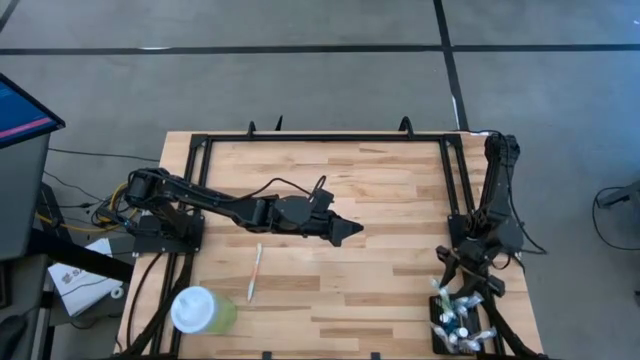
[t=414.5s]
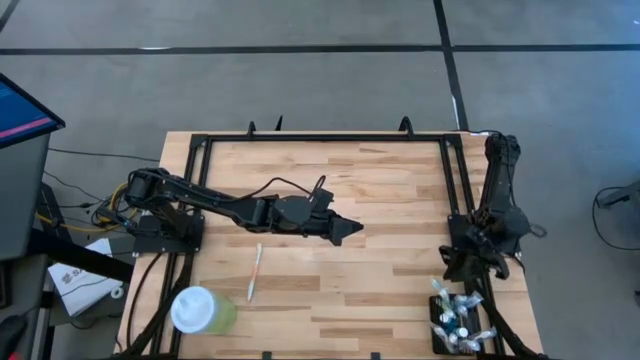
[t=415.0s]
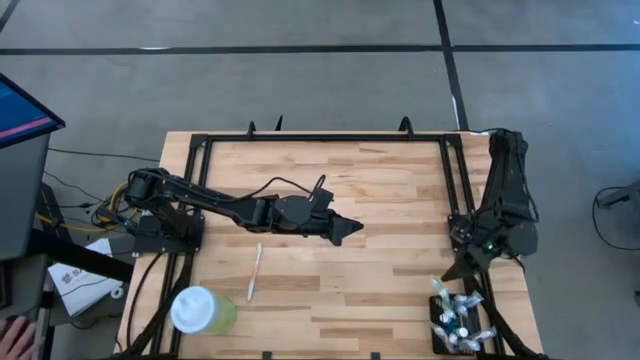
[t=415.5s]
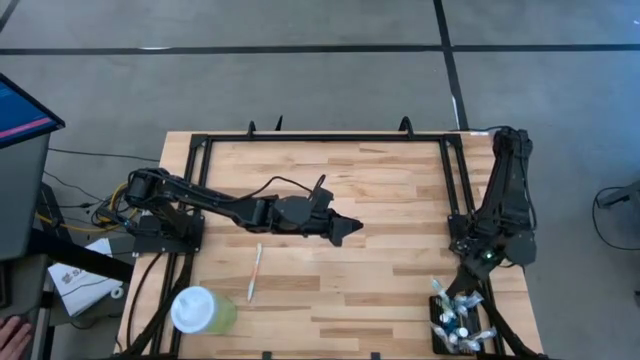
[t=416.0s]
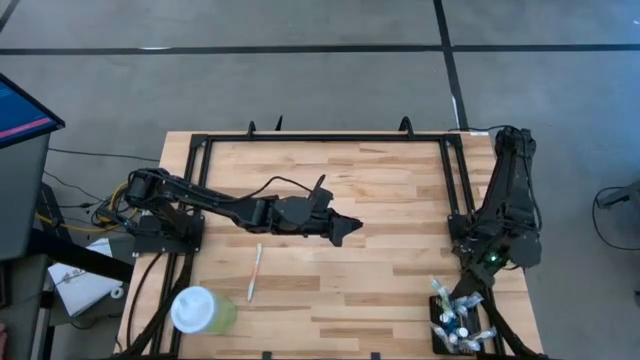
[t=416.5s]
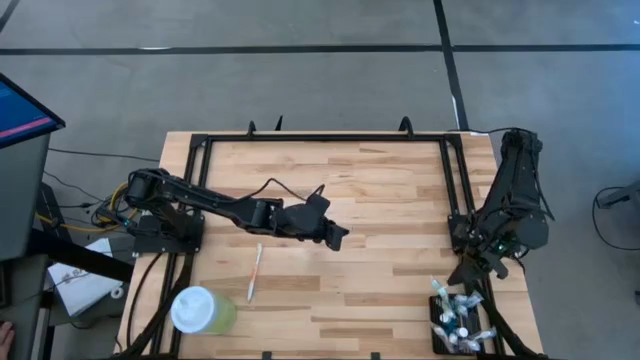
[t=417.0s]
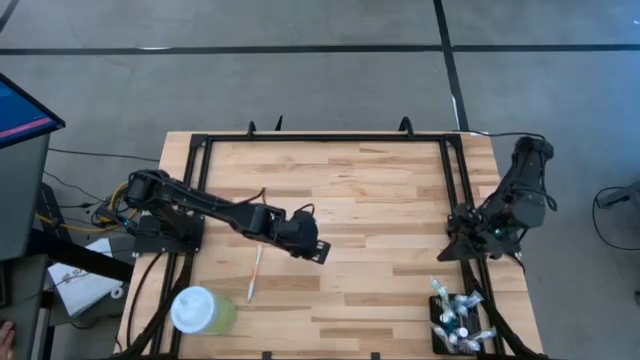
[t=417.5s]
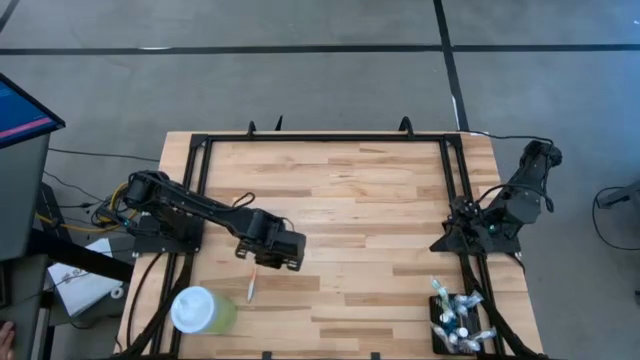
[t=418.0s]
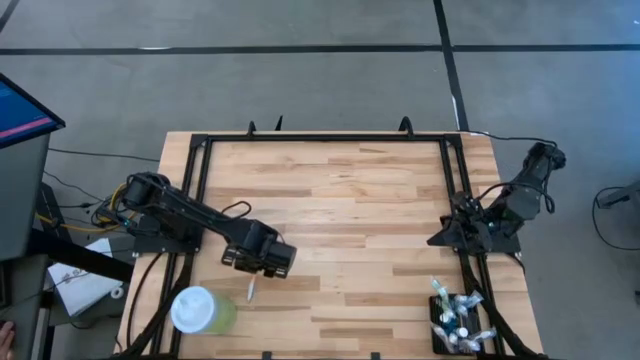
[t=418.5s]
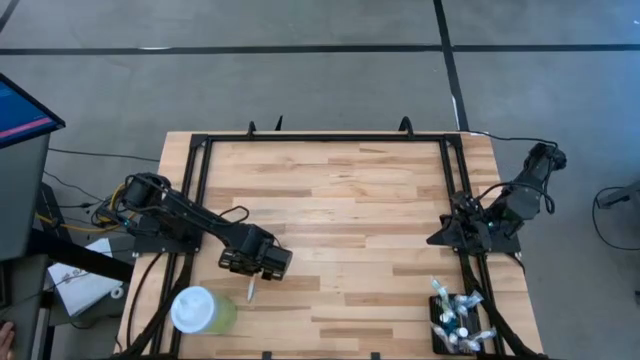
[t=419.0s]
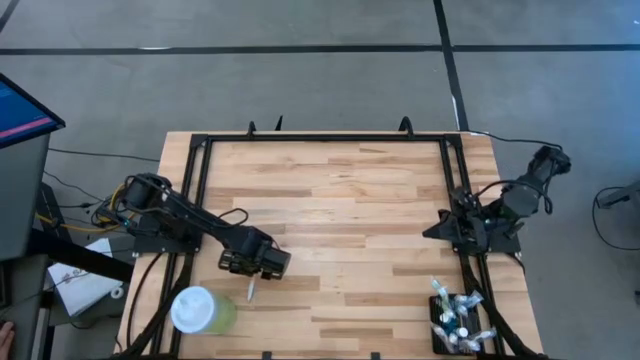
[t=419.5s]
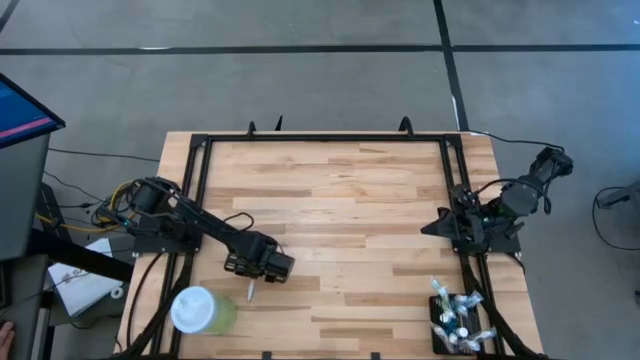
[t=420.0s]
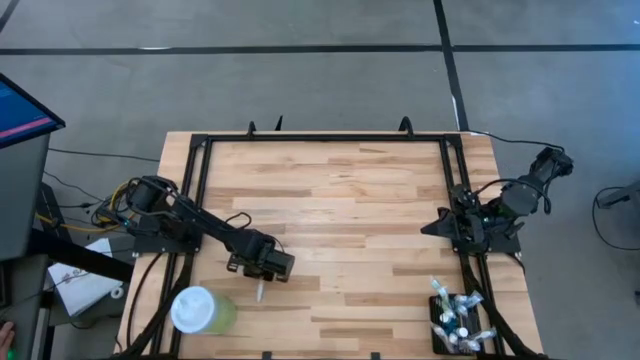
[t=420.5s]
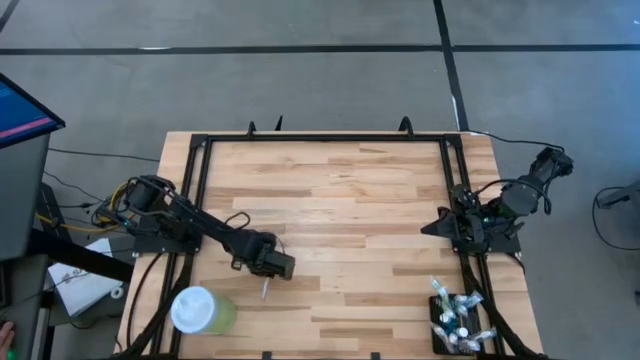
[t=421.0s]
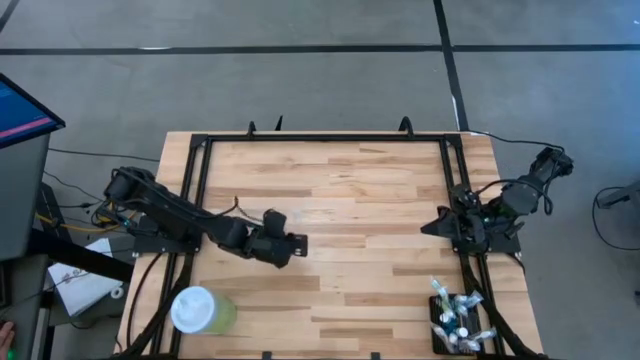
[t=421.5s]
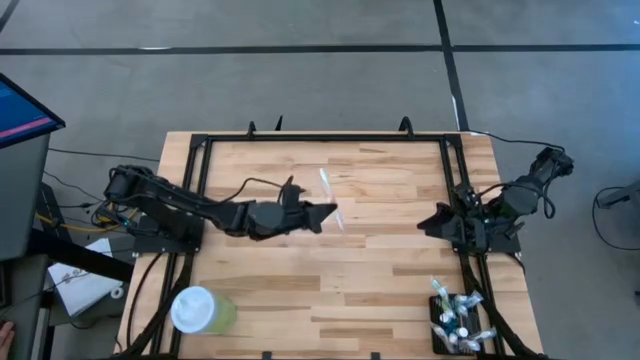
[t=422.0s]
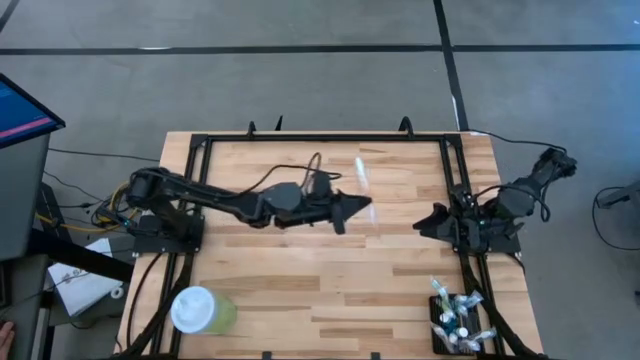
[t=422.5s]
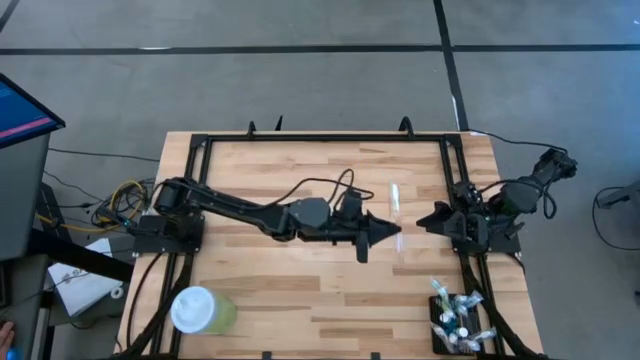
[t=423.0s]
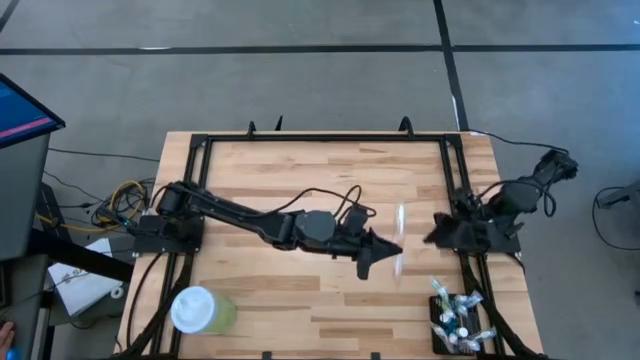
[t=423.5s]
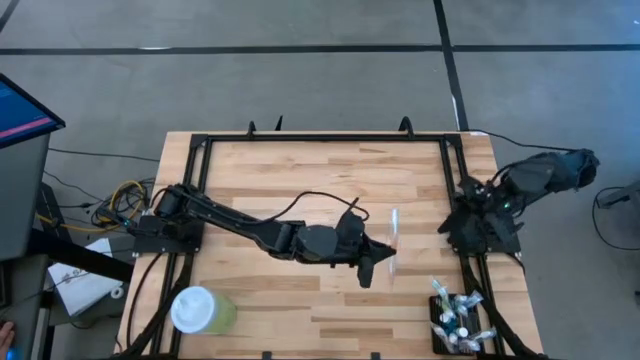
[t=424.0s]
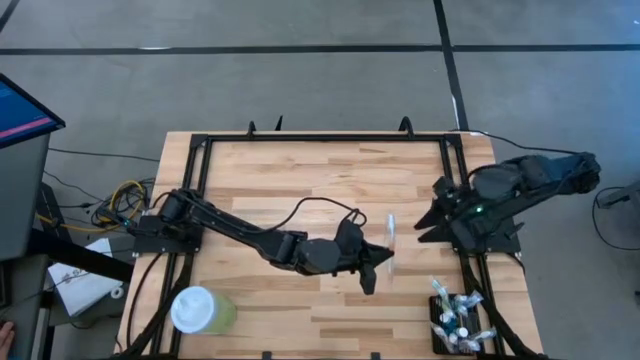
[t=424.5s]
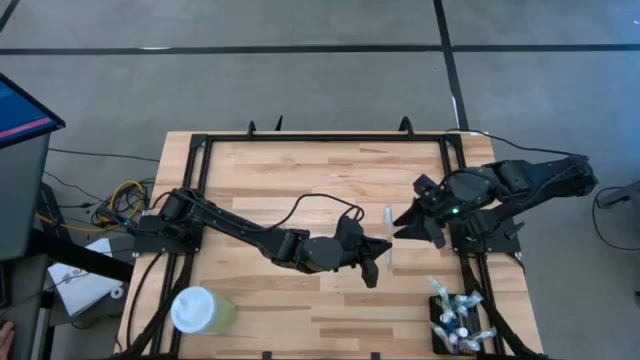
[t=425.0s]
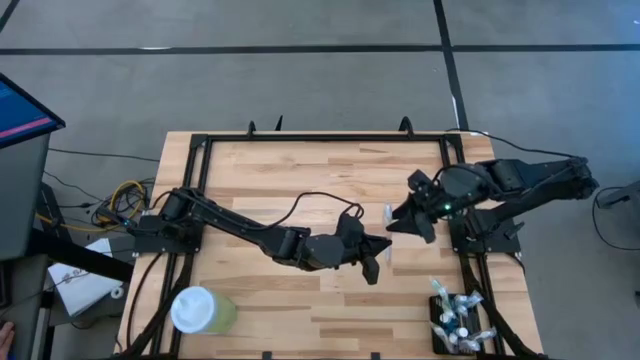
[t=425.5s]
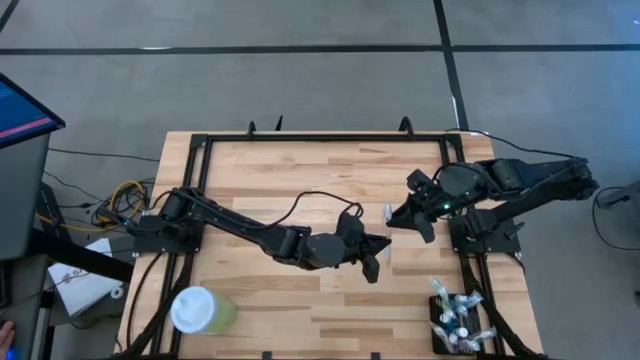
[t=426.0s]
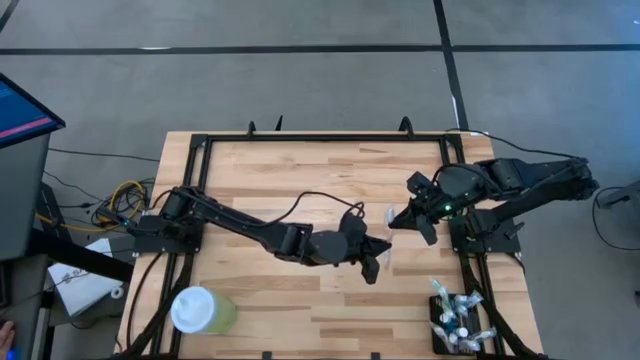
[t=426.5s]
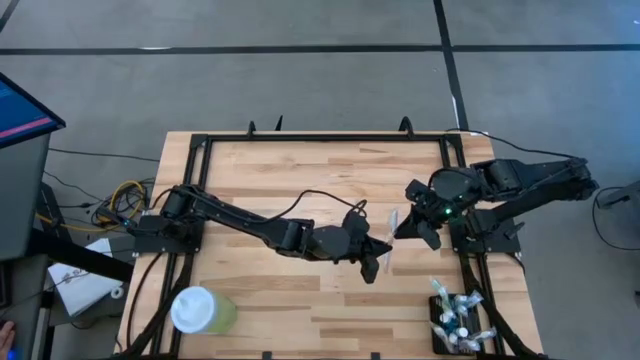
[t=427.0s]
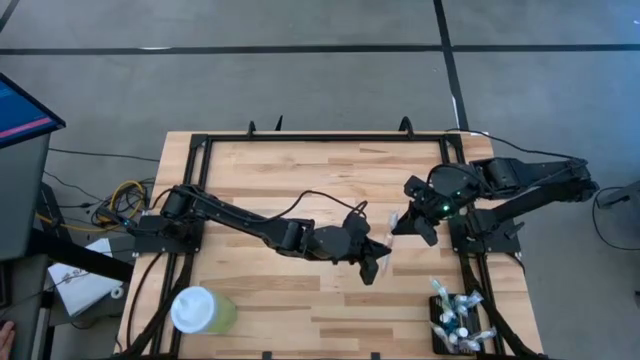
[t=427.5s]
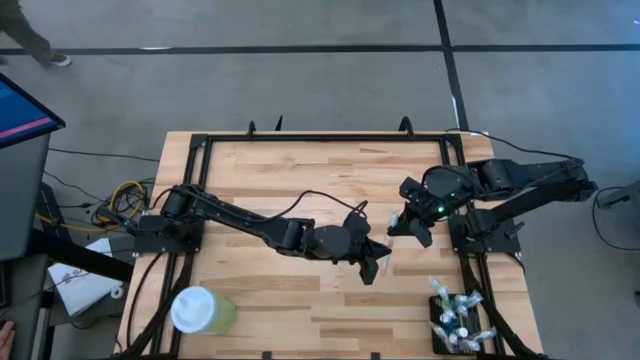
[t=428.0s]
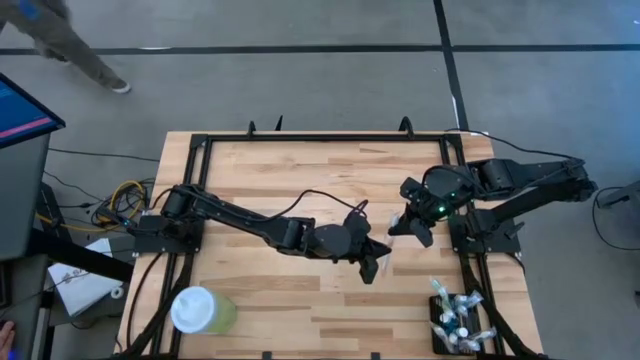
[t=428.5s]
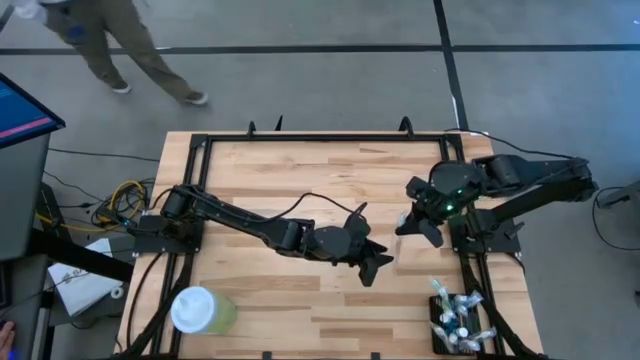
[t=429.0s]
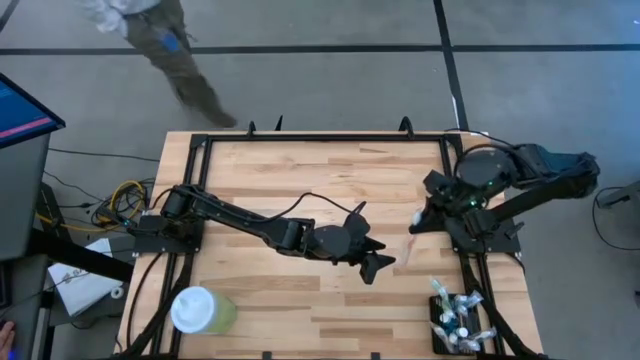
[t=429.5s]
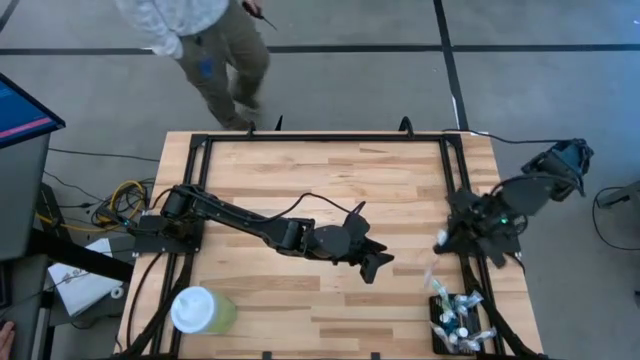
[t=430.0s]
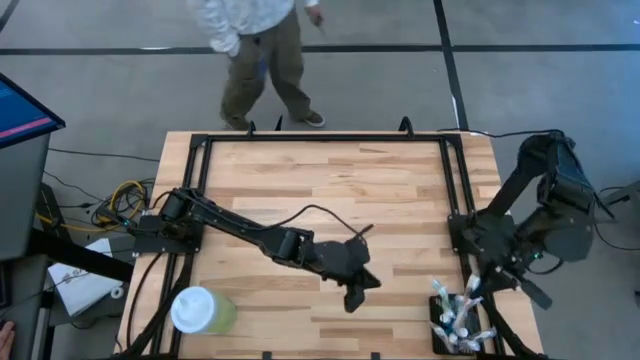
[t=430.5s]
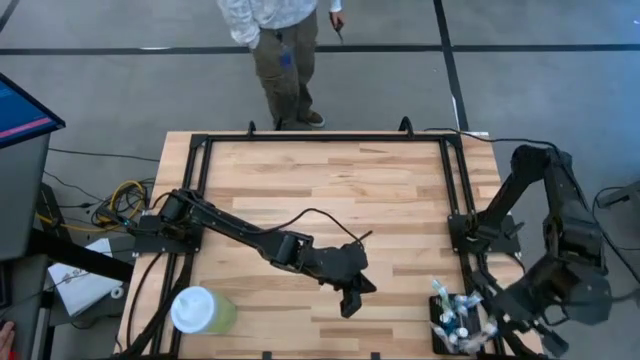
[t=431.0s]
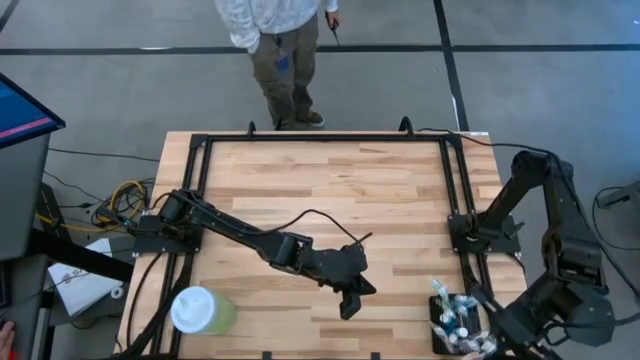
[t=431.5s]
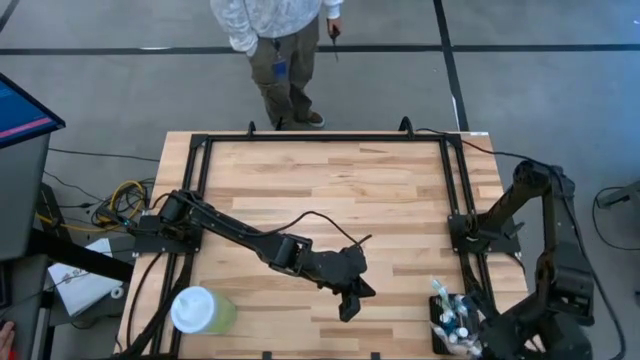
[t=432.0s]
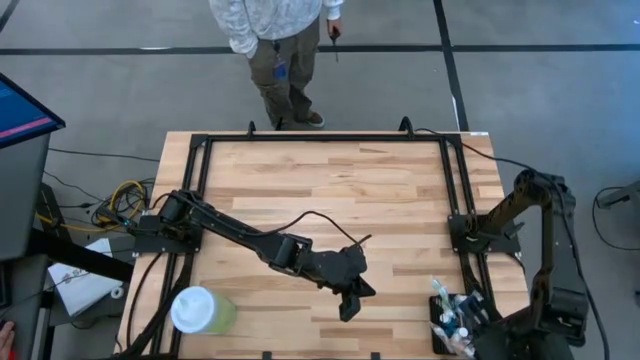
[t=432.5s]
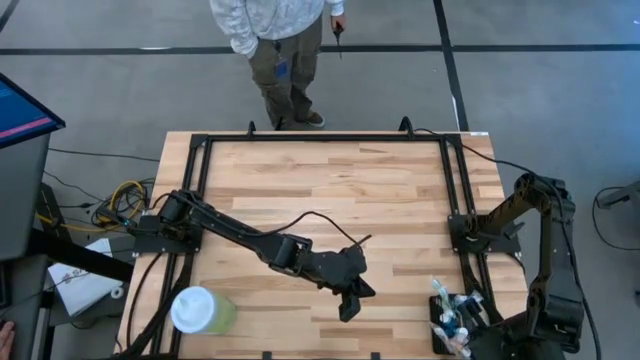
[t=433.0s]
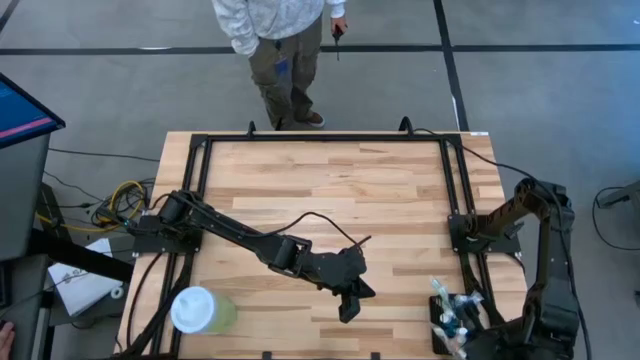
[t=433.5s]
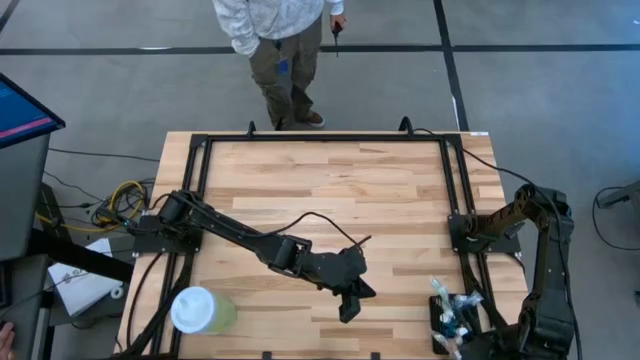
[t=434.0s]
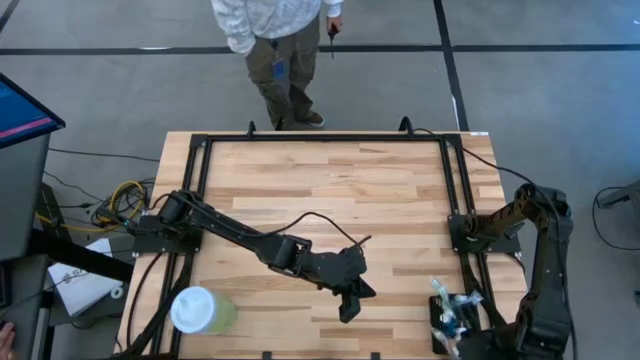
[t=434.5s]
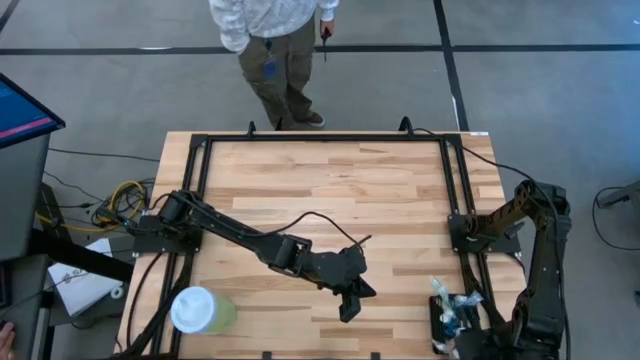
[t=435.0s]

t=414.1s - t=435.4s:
Task: Pick & Place toothbrushing station
Put the orange toothbrush into the black organizer

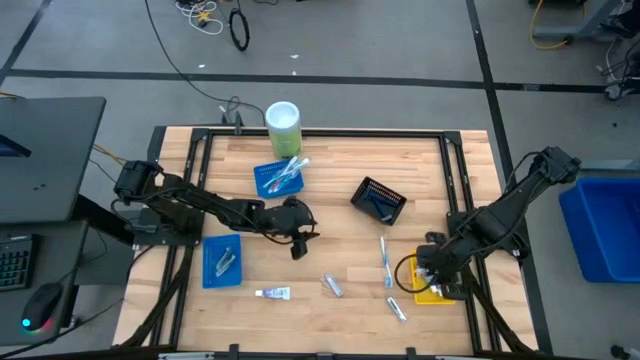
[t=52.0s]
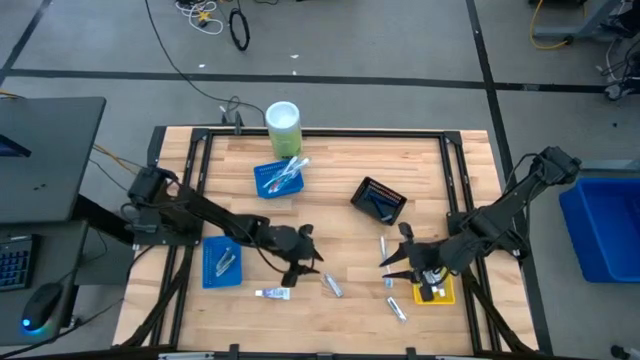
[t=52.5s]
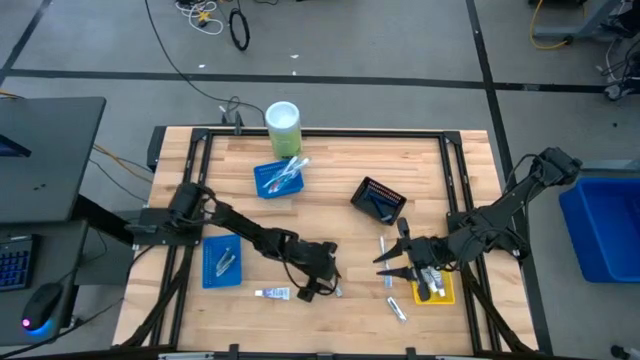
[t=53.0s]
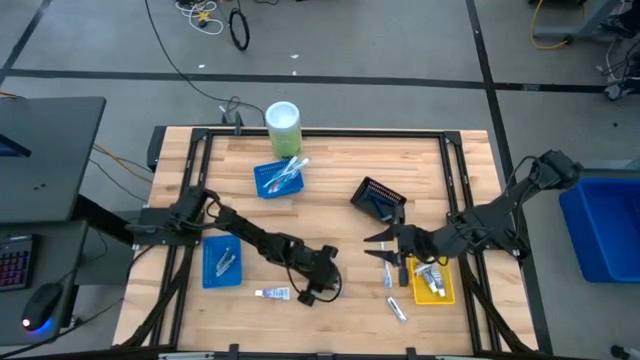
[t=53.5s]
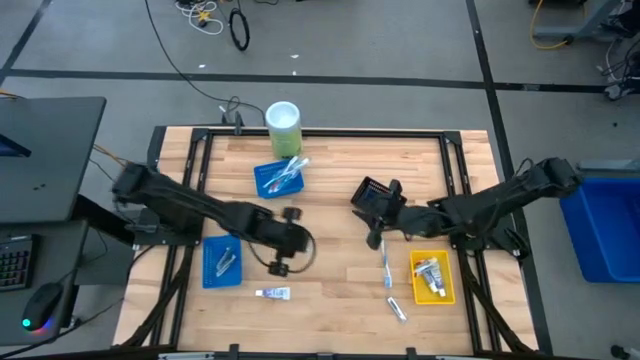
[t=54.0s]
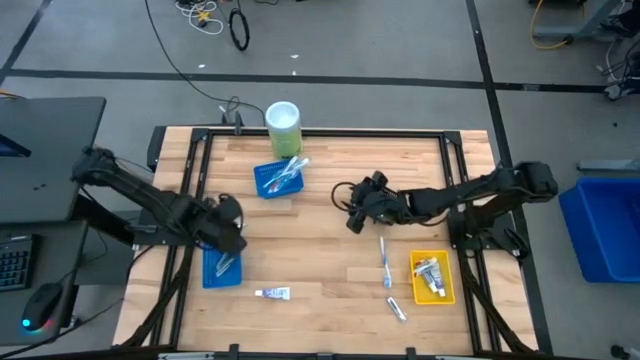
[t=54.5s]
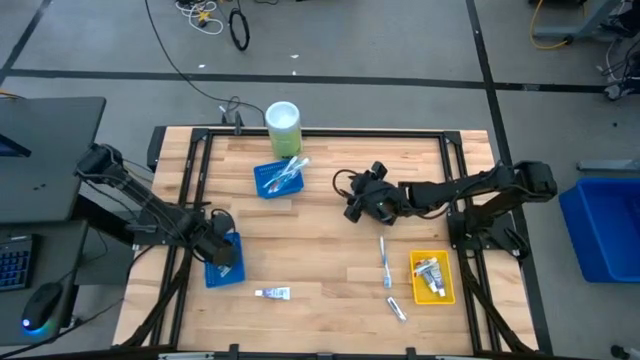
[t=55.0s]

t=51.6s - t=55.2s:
Task: Pick & Place Travel size toiletries
Put the silver nail cutter into the bottom blue bin
